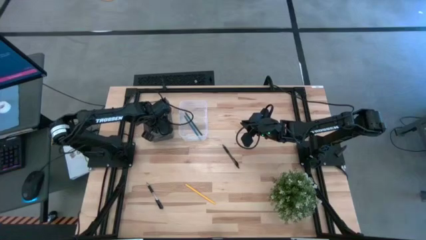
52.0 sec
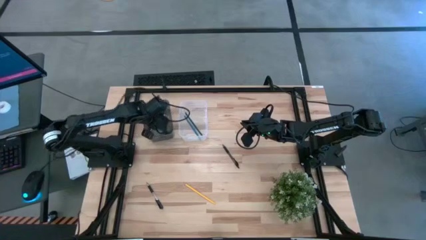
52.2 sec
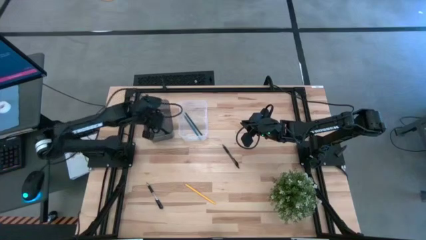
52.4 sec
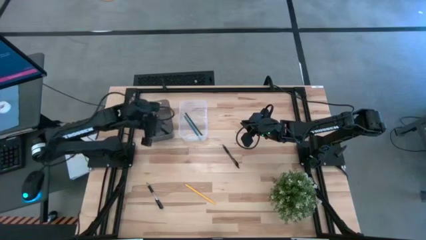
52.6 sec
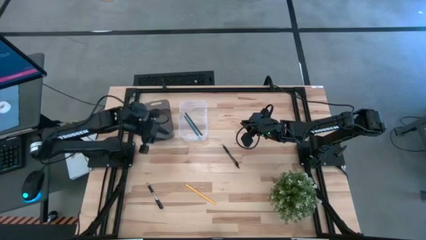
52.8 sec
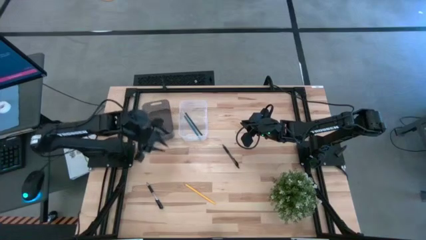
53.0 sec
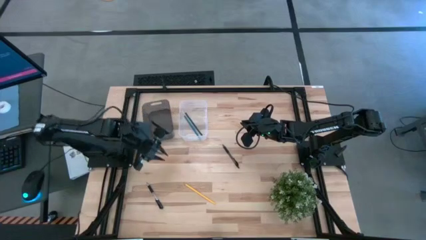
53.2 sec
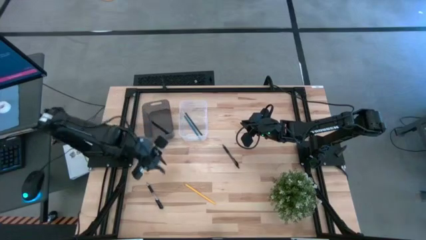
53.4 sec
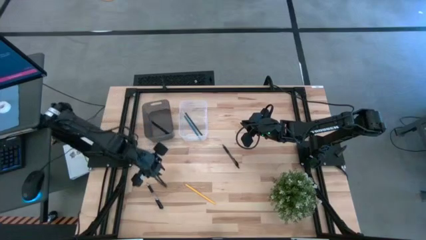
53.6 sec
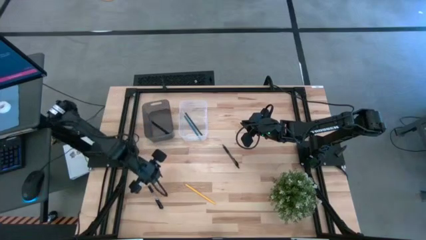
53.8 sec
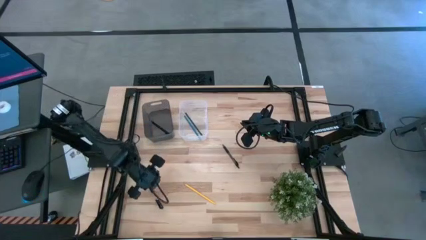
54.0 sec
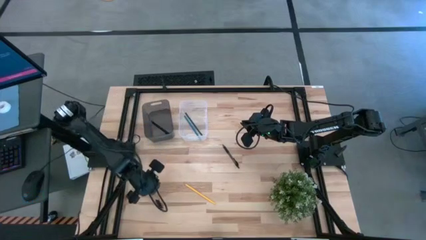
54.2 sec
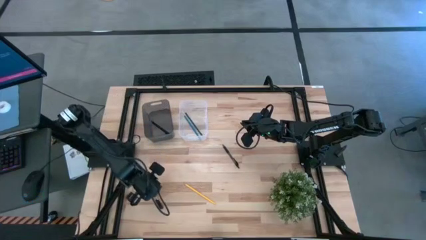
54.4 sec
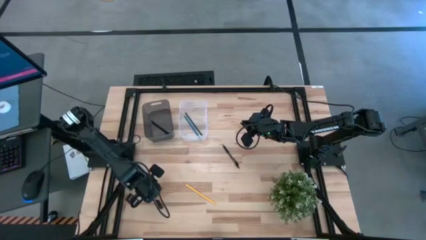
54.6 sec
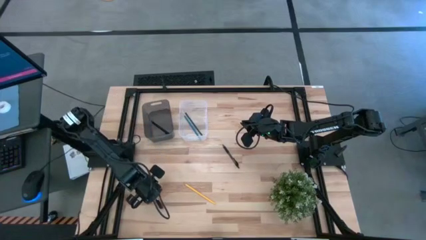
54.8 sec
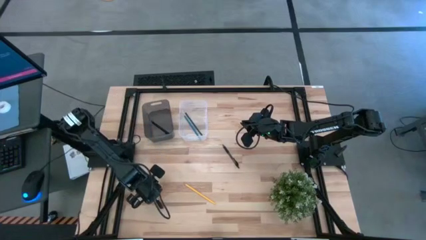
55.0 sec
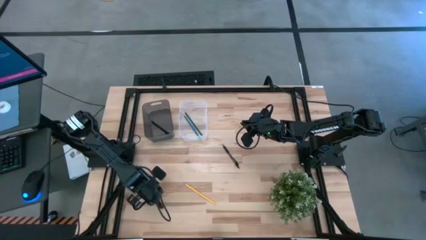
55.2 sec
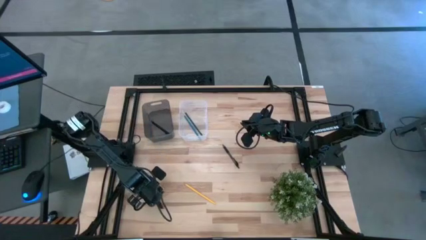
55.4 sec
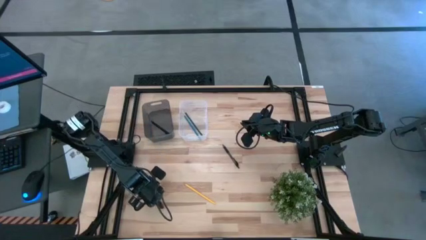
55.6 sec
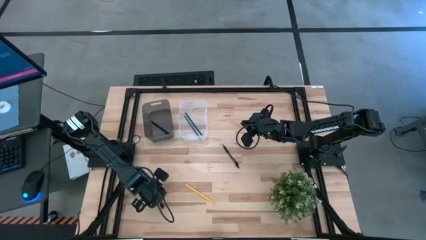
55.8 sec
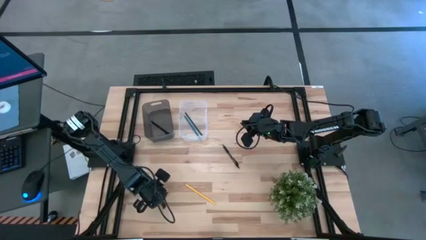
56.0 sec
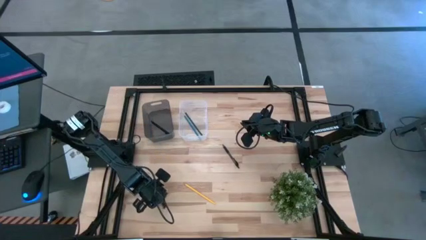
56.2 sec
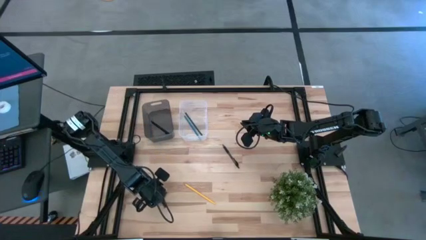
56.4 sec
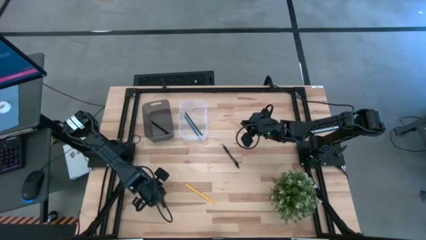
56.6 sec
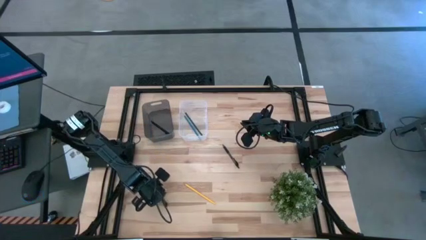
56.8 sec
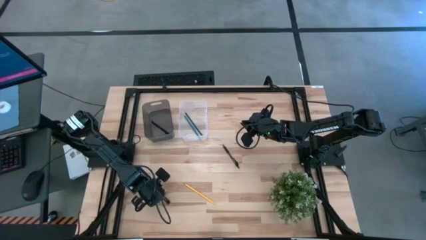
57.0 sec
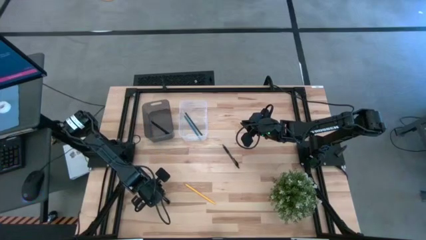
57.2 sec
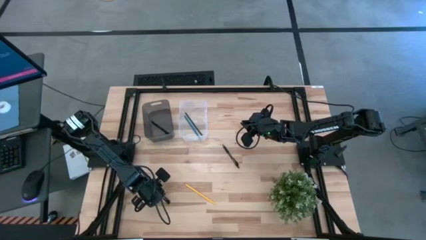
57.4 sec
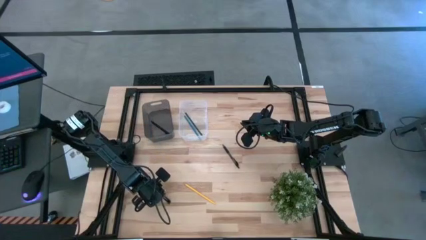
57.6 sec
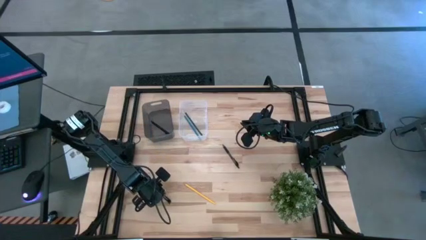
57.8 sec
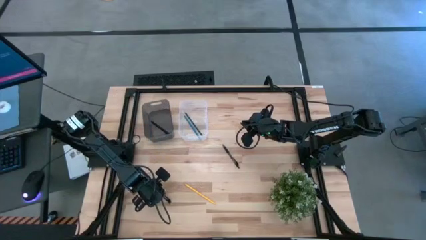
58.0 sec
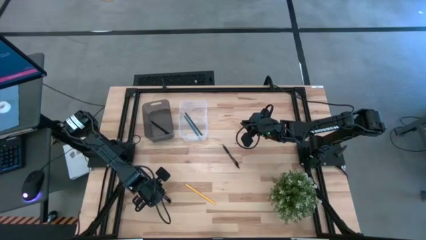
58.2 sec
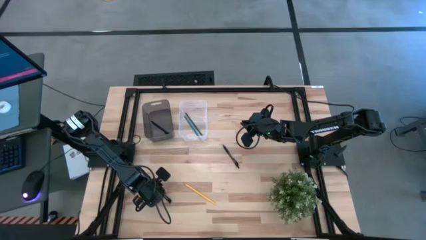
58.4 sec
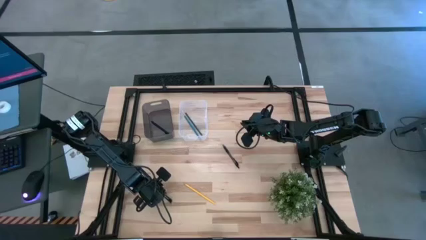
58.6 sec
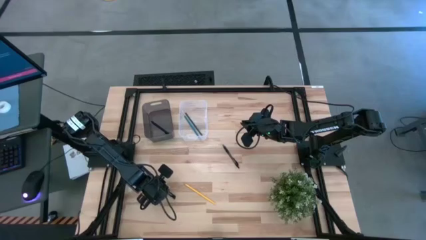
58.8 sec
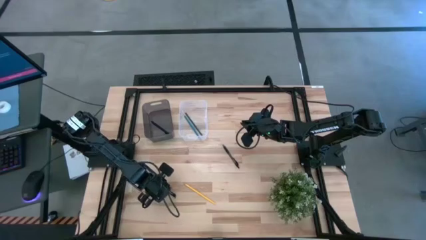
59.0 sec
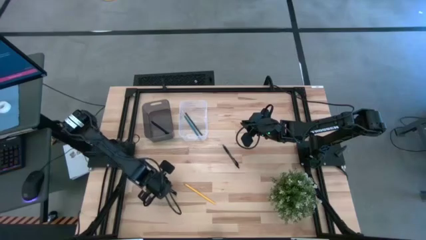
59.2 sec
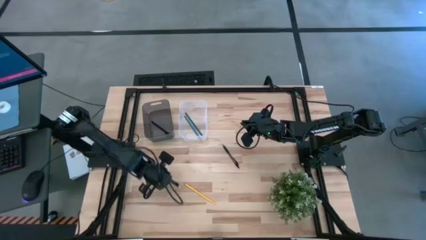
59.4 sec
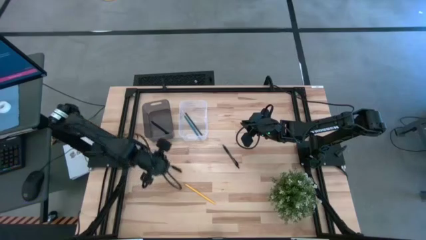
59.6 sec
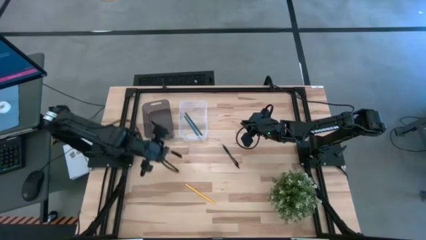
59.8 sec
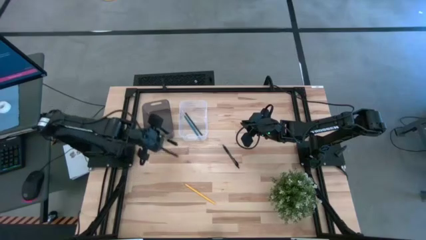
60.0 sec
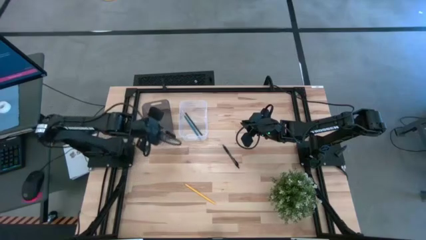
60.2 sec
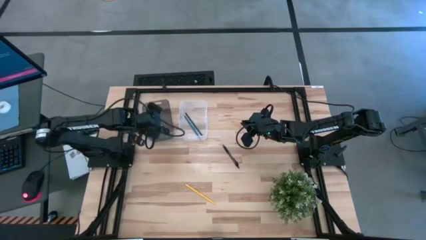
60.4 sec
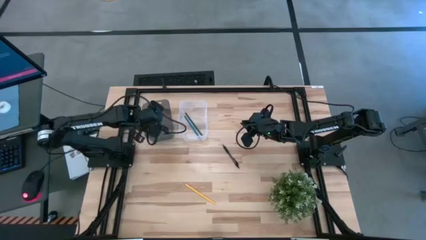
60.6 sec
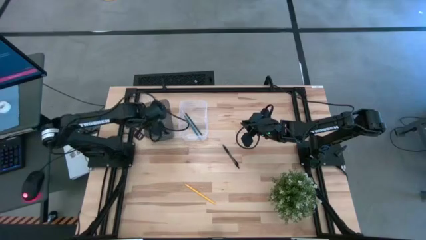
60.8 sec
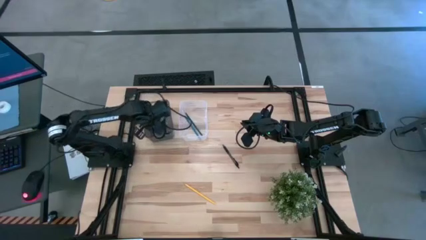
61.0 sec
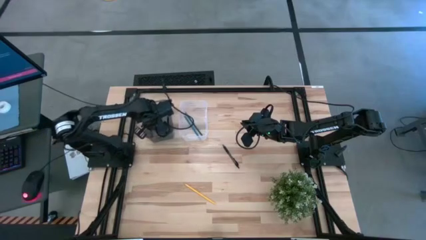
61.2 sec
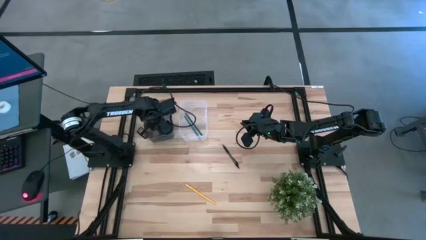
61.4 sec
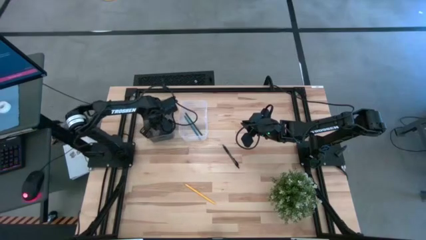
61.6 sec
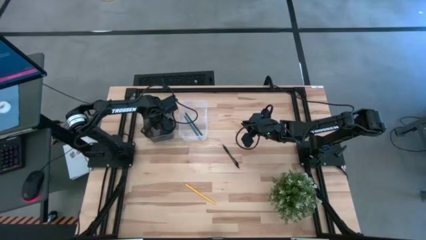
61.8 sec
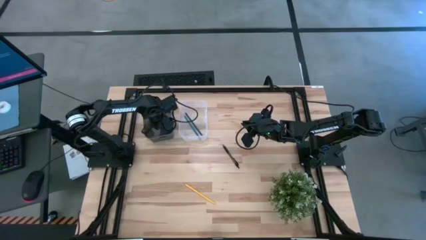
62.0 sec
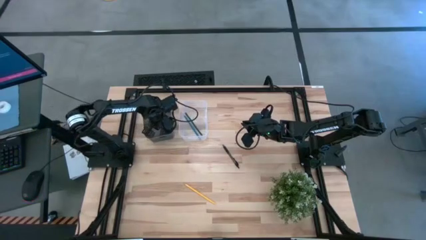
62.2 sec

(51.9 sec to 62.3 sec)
Task: Sort pens & pencils
Put the bottom black pen into the black bin

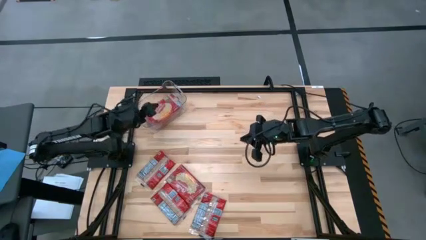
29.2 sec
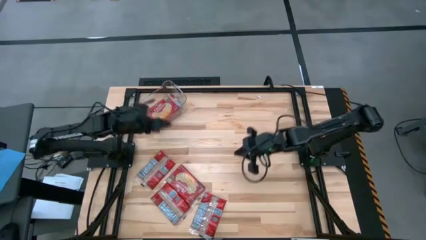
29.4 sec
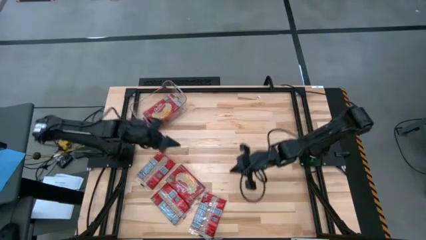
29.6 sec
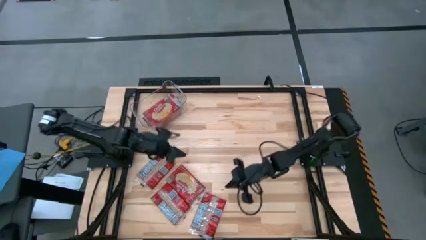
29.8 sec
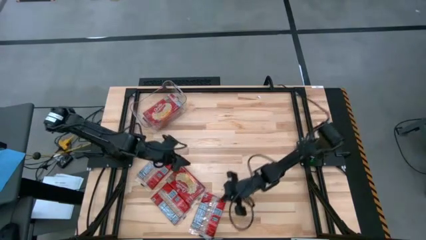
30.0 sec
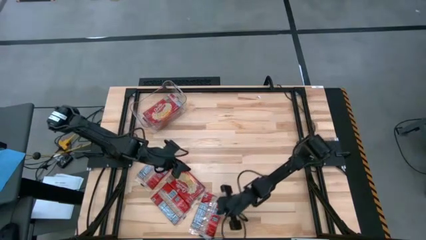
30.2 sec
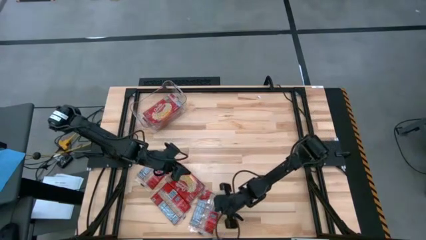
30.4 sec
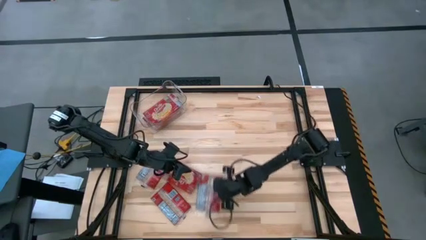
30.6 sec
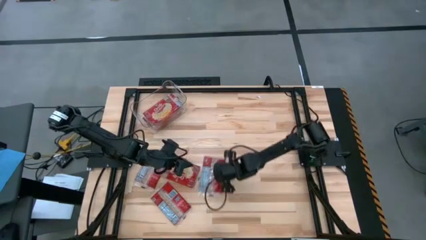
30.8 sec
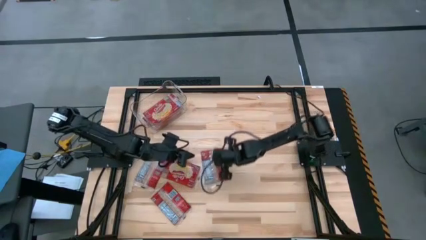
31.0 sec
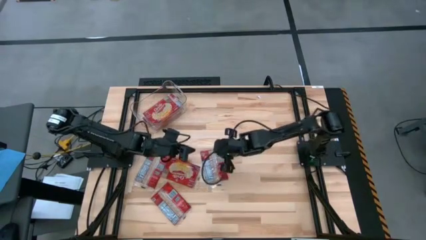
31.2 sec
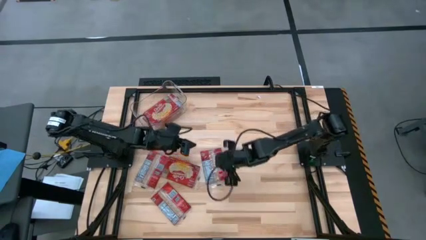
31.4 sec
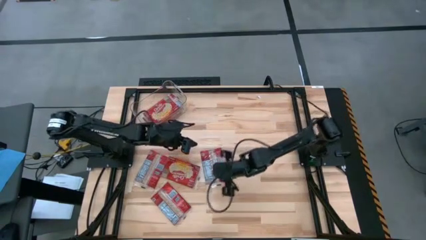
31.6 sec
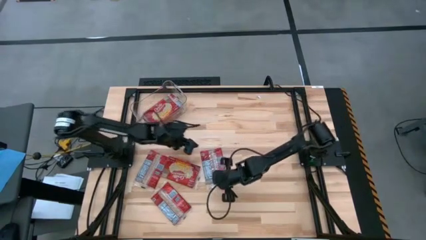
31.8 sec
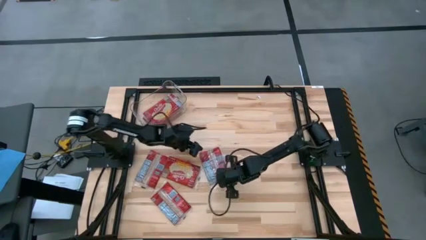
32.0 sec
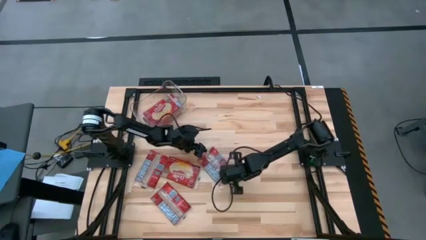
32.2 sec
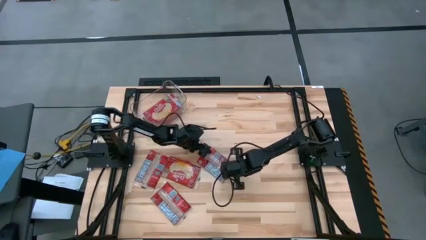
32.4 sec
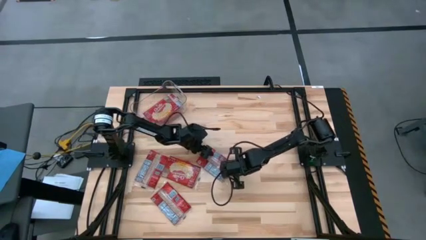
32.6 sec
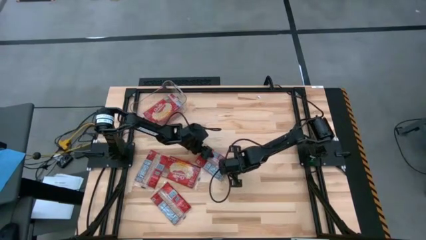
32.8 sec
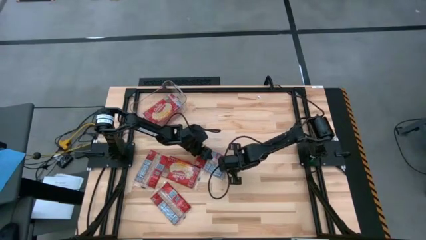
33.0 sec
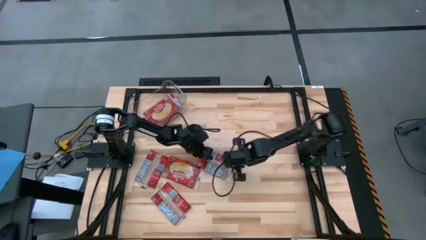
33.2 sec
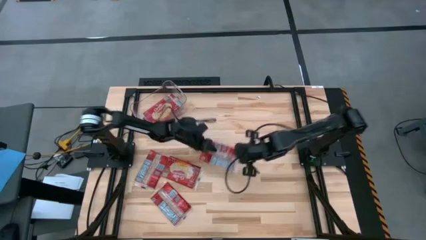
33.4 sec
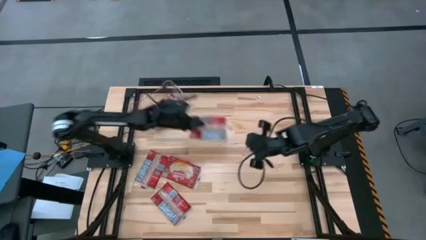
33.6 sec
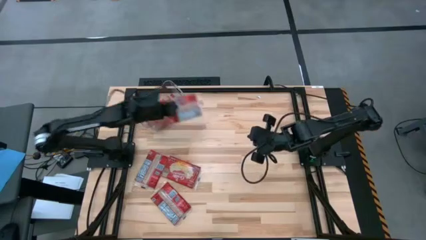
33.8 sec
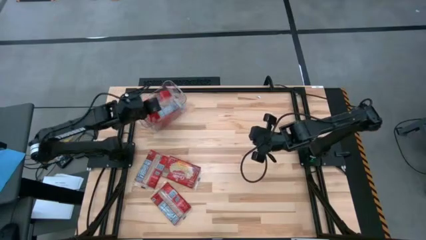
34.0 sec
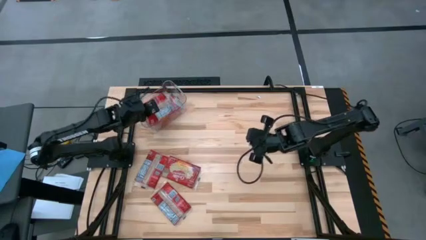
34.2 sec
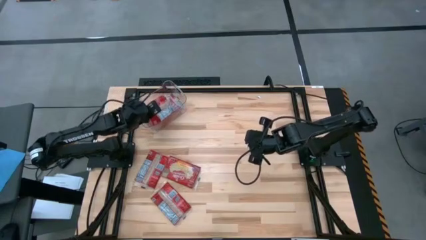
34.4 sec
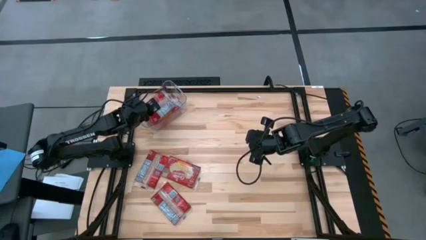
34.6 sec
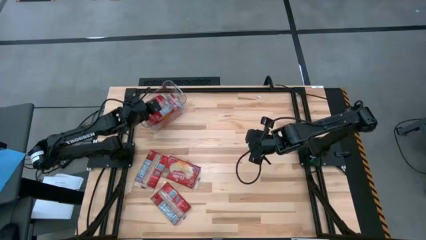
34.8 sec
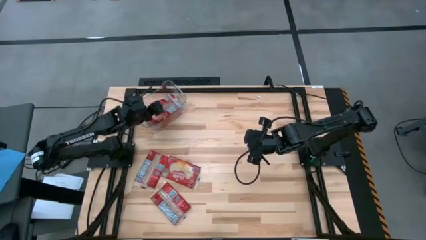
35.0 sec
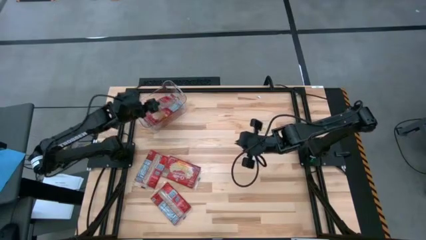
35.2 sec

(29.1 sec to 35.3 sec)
Task: Sort popcorn bags into baskets
Put the red popcorn bag into the transparent bin
